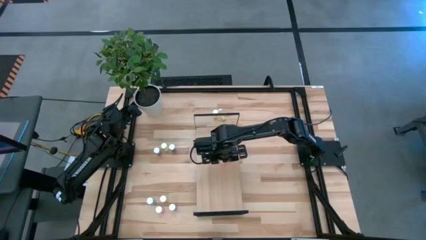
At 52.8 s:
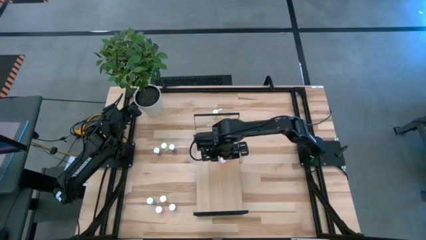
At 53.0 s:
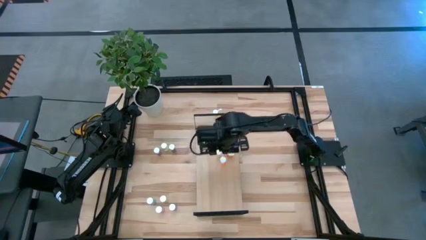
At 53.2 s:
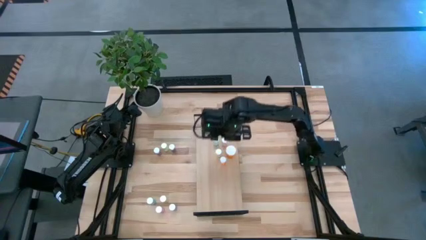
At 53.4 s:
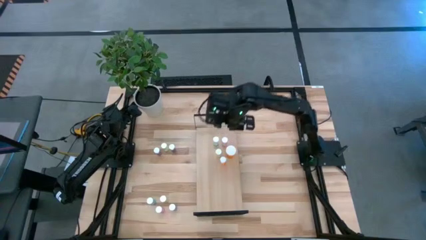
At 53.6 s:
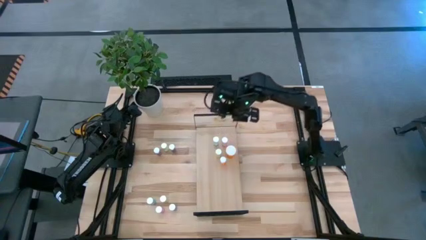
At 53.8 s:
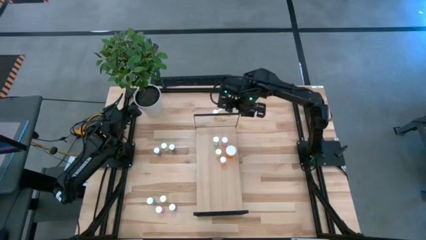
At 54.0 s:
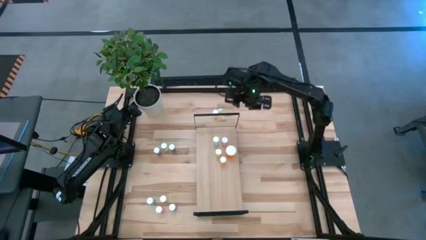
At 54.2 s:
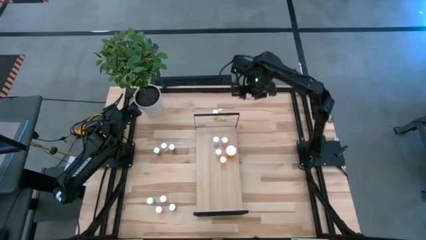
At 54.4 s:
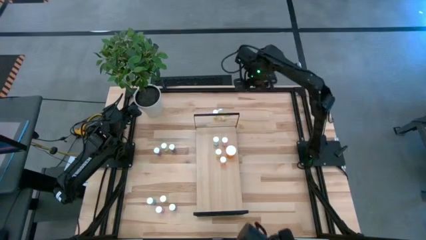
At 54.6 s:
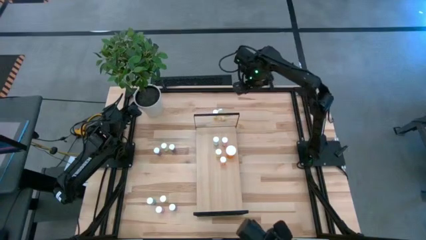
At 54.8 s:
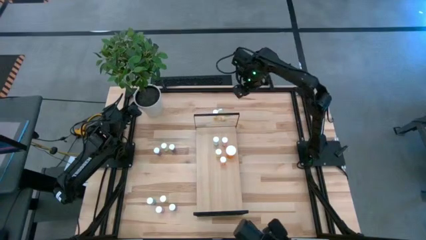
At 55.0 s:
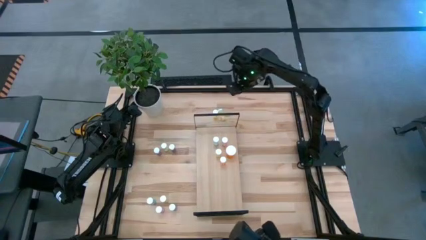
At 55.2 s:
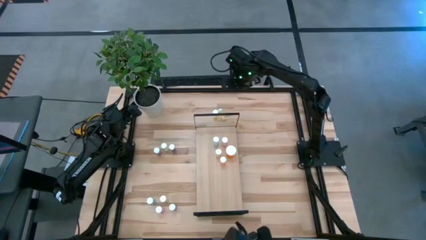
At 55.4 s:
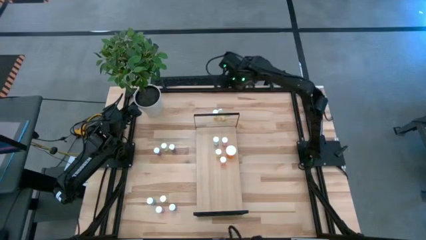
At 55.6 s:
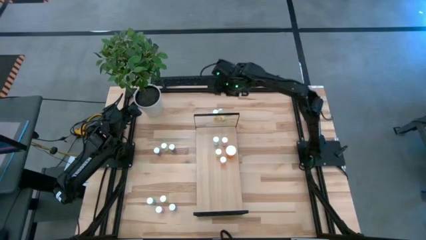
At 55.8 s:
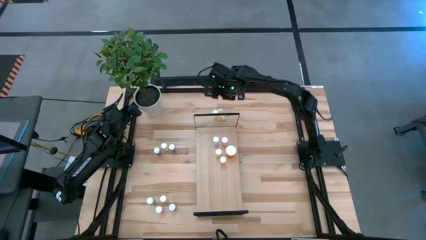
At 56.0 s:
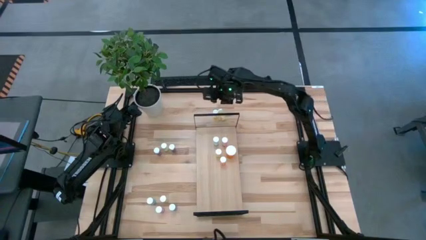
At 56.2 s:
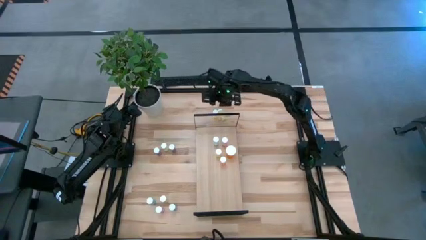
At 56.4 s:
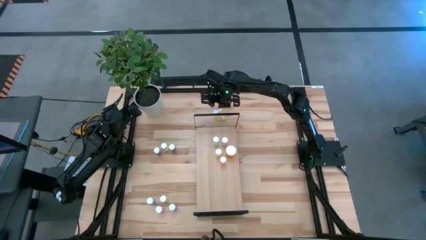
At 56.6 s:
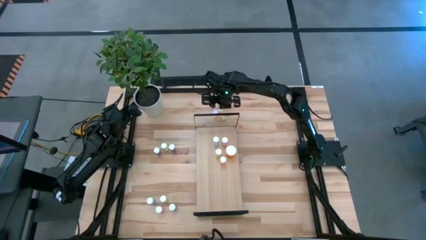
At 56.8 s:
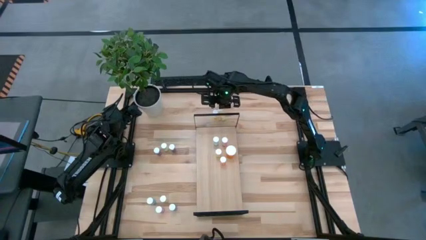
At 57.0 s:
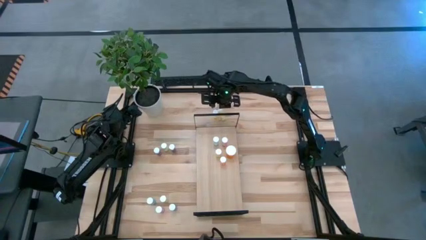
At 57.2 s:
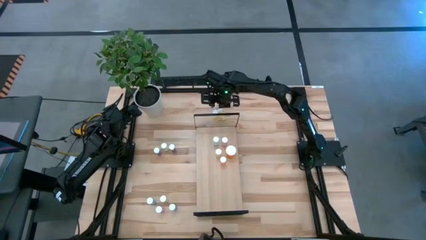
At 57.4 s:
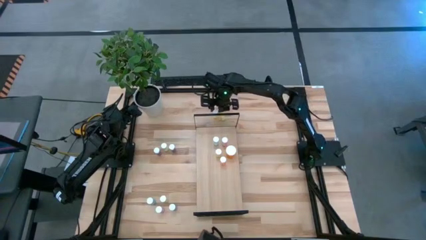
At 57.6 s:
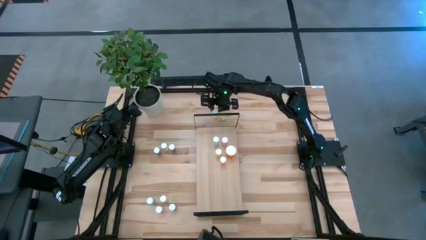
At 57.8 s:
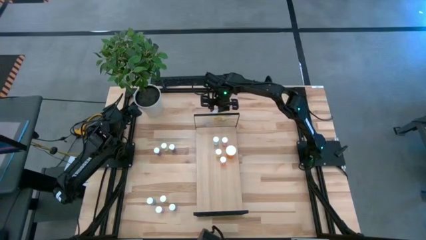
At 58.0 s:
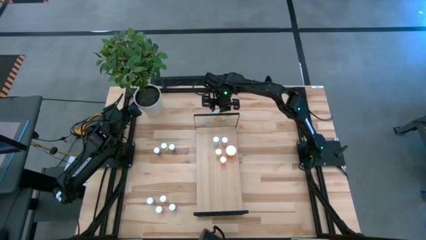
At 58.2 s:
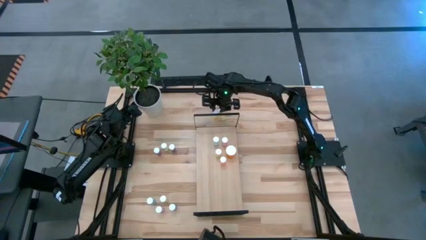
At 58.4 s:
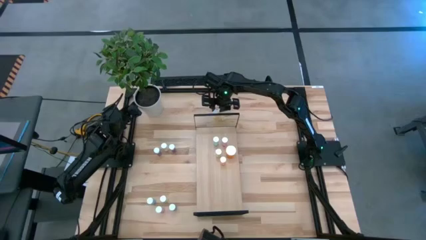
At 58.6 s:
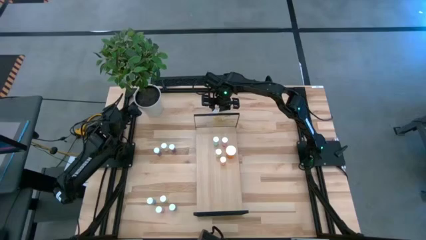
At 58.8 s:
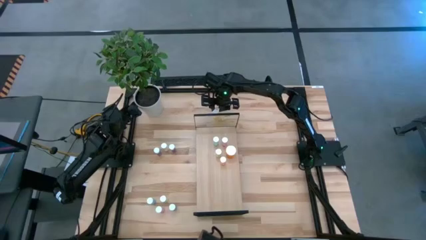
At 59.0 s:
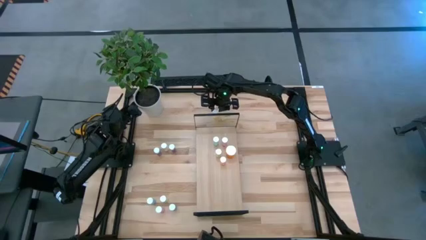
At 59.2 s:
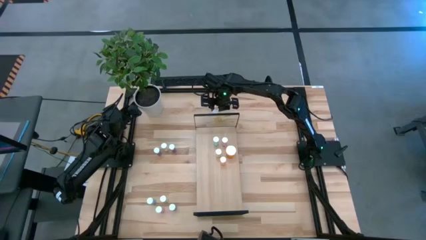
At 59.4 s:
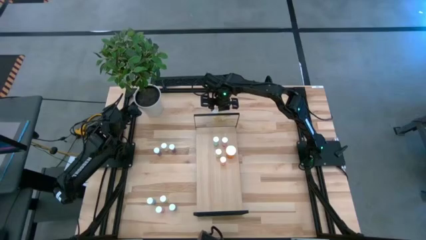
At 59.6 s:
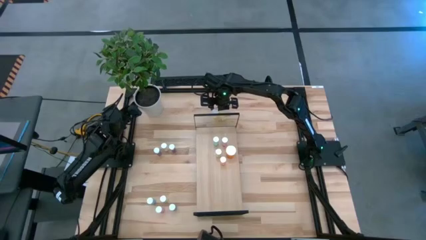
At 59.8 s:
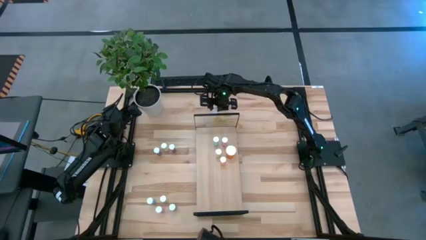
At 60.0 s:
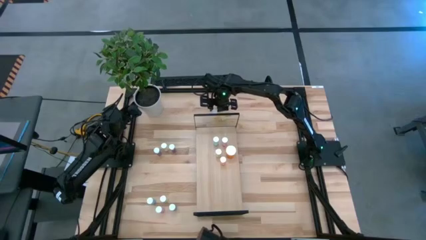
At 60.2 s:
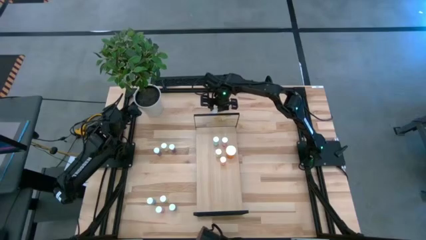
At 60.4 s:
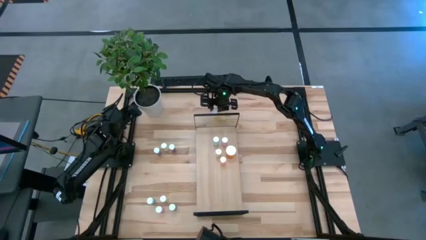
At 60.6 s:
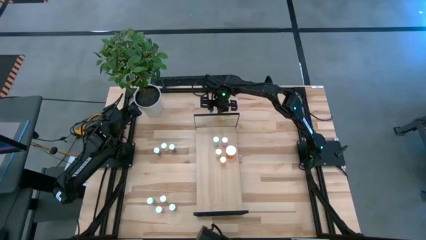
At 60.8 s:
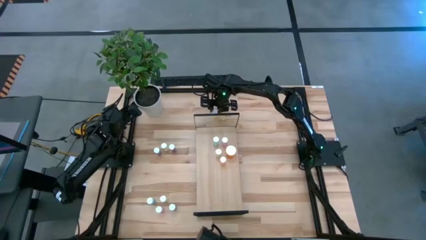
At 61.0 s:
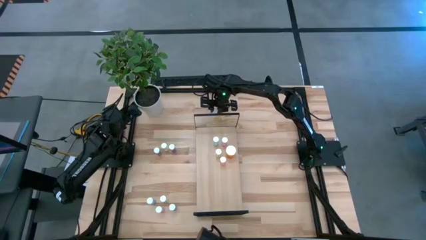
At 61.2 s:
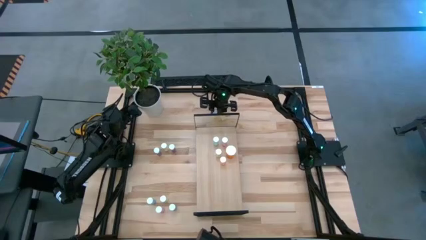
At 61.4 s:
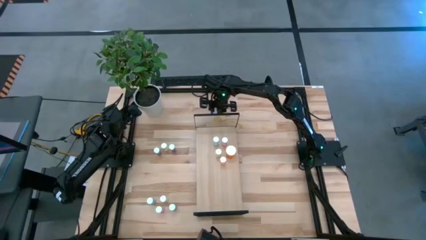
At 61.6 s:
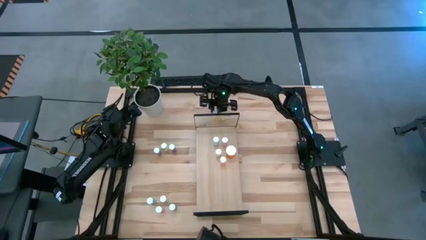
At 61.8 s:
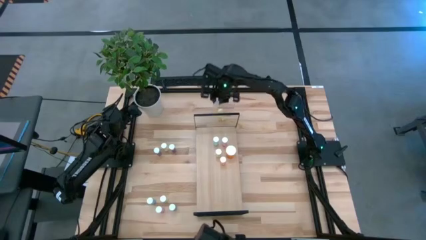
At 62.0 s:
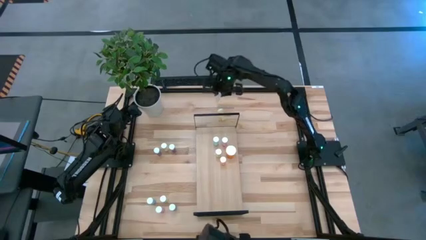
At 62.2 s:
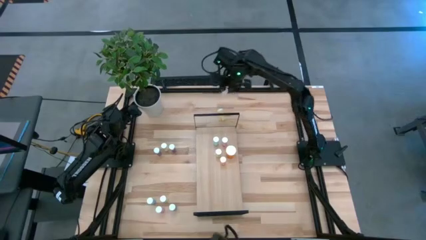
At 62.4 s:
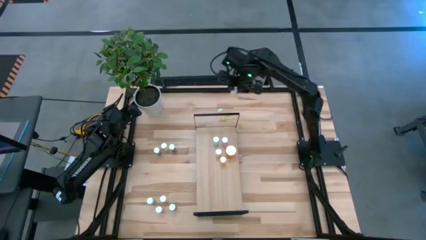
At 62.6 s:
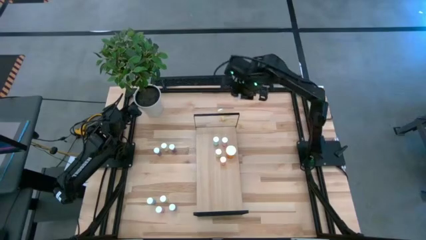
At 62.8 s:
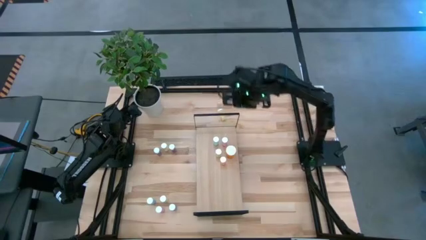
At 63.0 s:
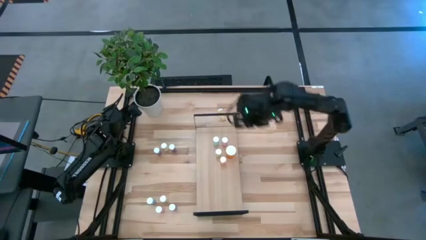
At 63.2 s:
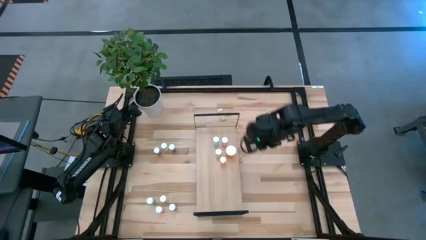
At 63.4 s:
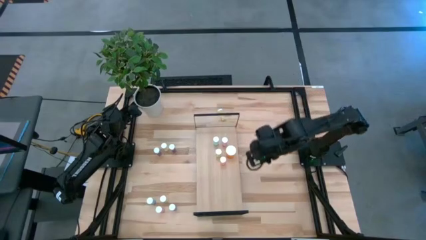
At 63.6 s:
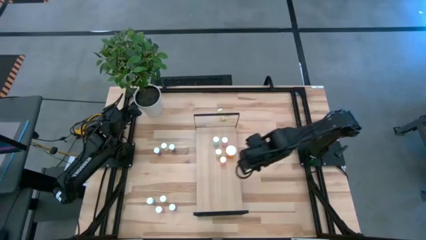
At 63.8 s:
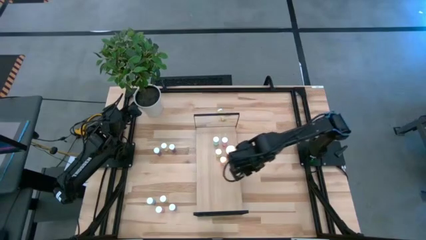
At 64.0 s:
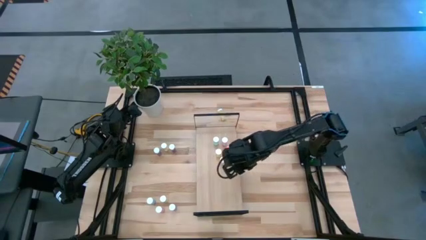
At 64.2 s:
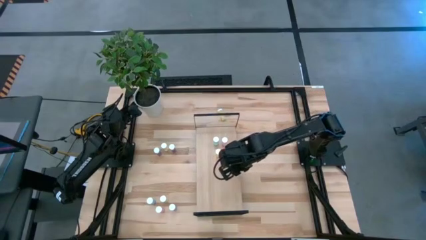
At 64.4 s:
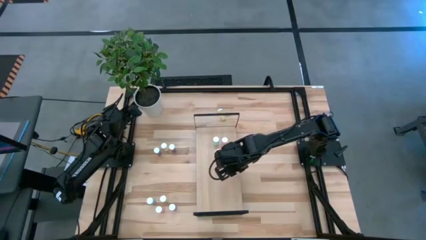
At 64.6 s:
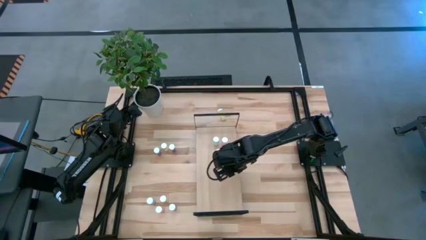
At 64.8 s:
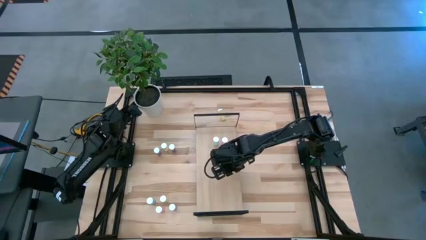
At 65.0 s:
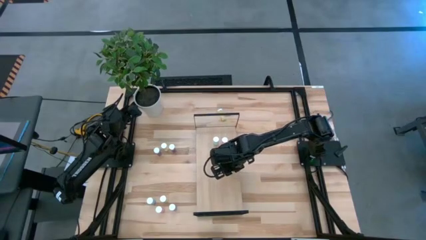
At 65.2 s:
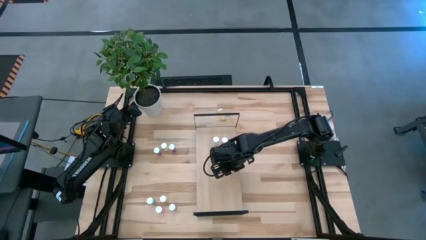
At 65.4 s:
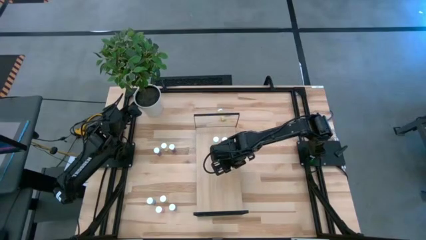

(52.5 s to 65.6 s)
Task: Pick and place medicine bottles onto shelf by color
Put the yellow pill bottle on the shelf

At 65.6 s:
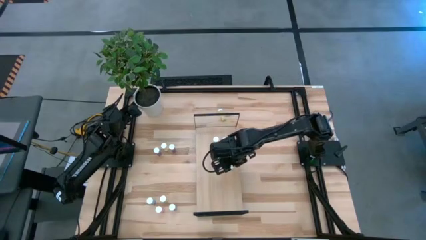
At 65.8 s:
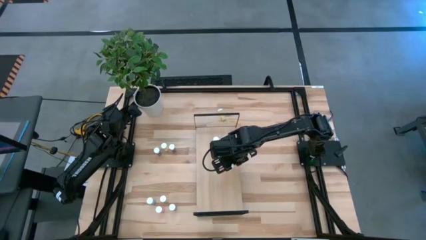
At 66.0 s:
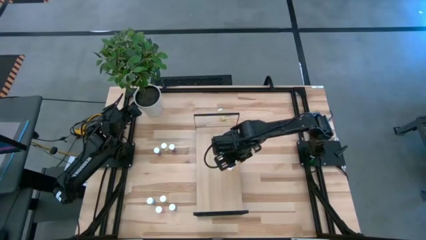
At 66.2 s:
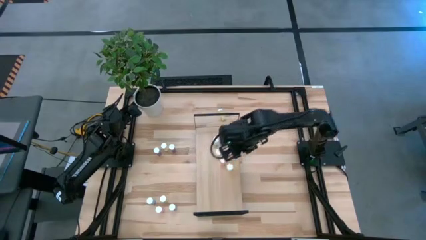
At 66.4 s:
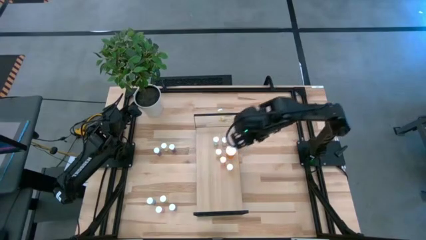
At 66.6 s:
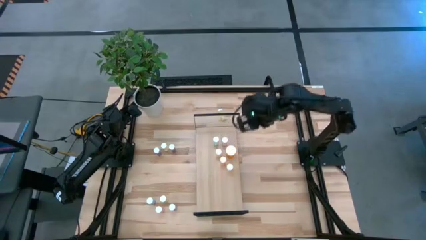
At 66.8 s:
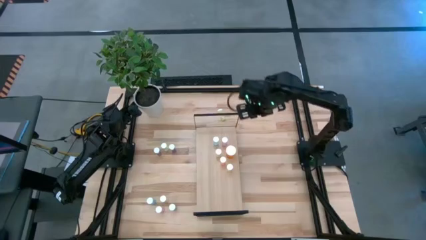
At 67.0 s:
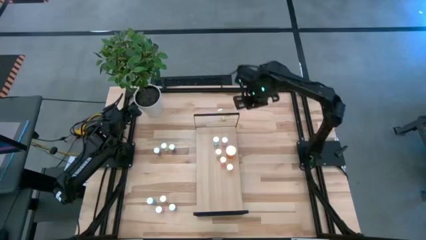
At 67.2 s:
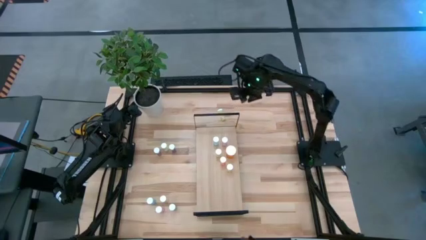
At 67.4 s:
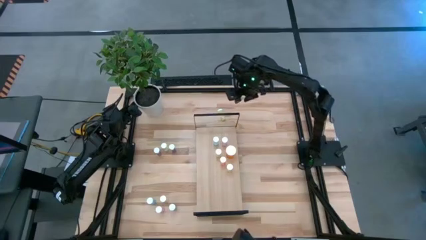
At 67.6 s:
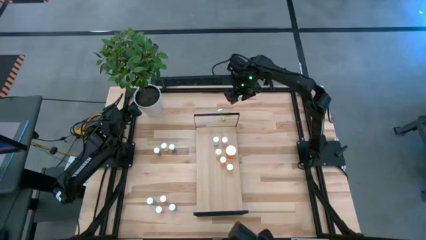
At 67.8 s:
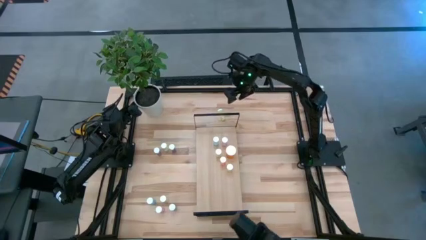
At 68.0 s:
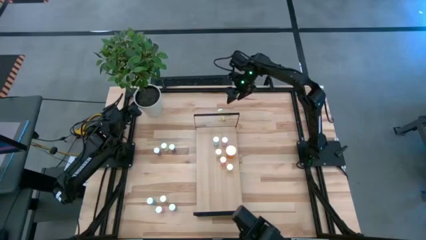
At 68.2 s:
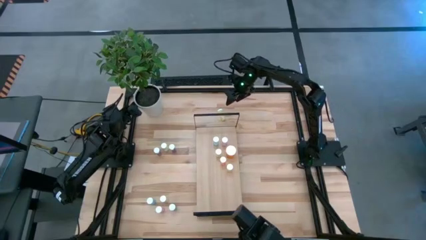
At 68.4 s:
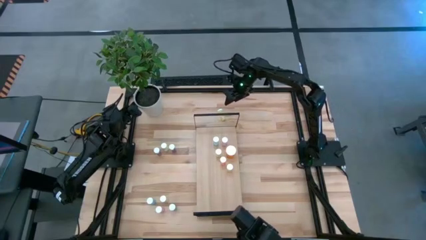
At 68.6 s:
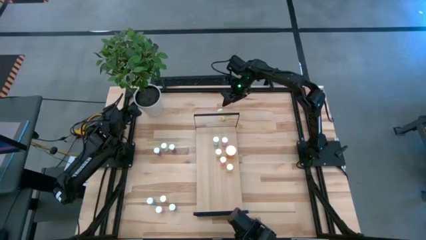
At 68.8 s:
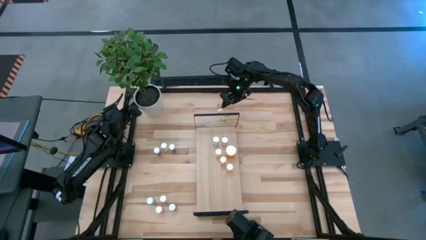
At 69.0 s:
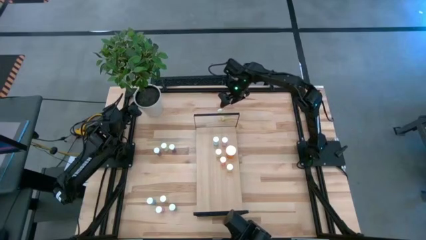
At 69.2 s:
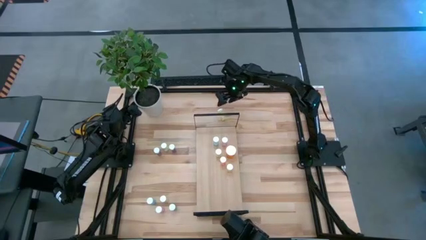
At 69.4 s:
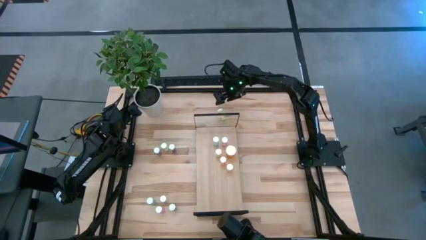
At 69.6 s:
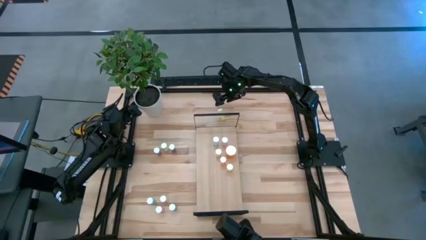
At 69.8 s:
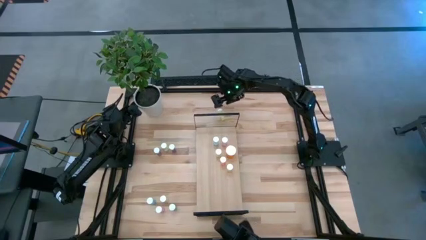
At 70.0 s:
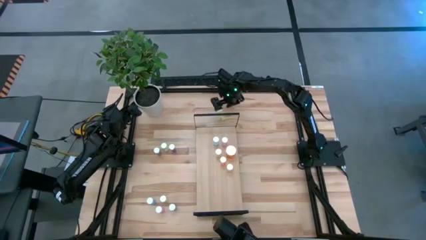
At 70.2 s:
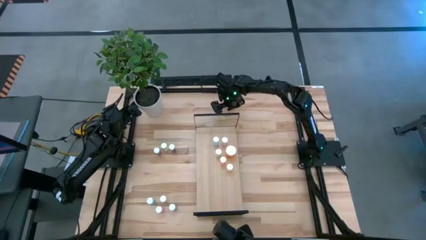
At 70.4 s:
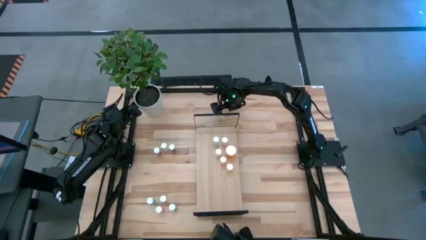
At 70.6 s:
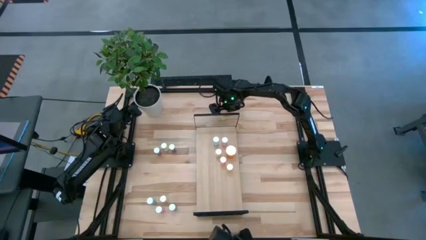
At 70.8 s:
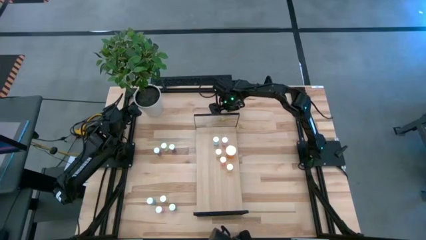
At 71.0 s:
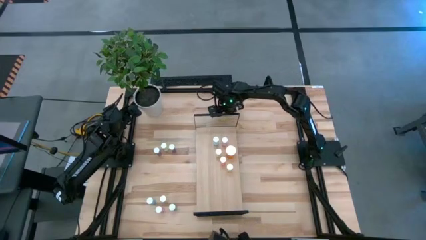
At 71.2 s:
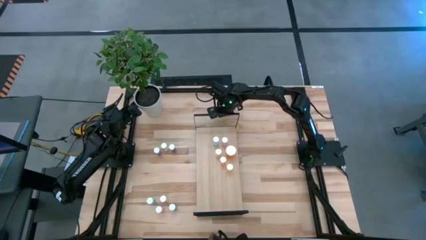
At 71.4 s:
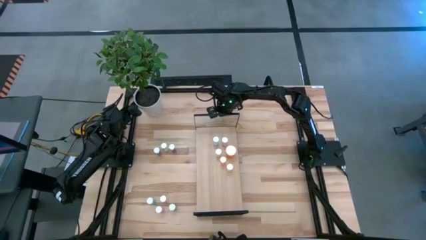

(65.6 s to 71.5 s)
Put the yellow pill bottle on the shelf
